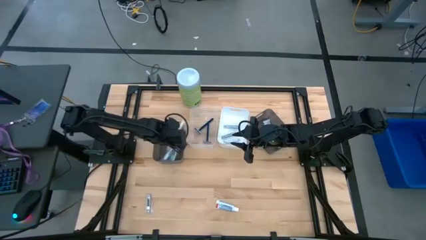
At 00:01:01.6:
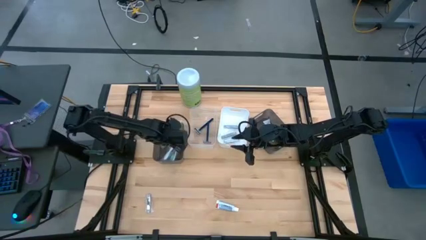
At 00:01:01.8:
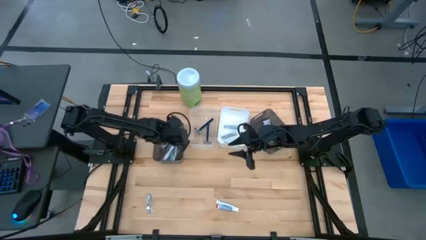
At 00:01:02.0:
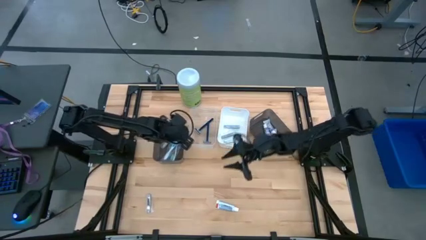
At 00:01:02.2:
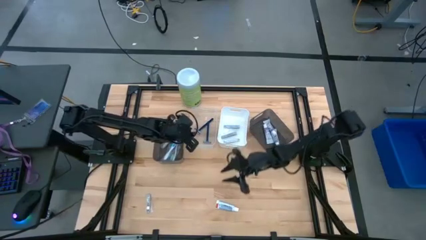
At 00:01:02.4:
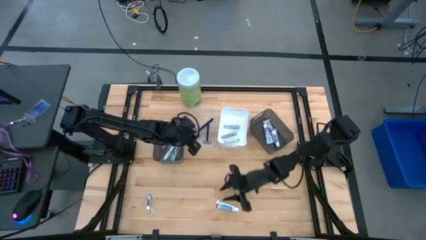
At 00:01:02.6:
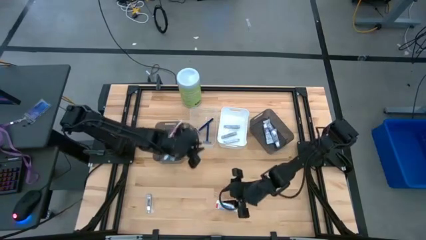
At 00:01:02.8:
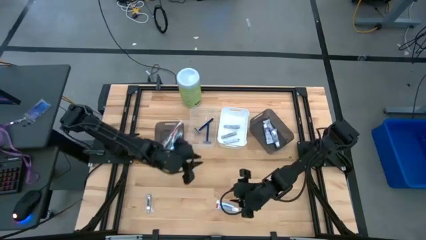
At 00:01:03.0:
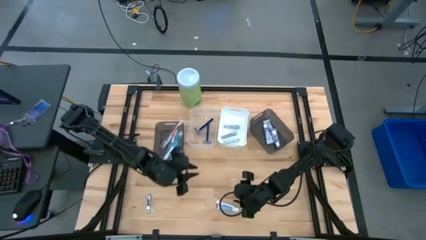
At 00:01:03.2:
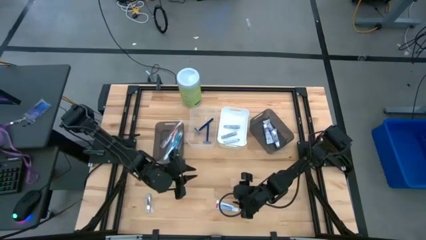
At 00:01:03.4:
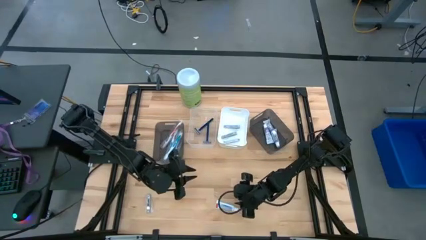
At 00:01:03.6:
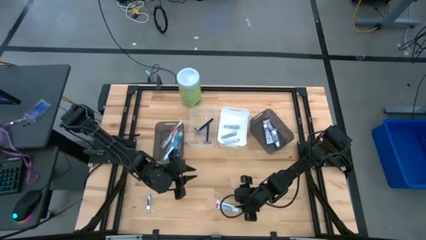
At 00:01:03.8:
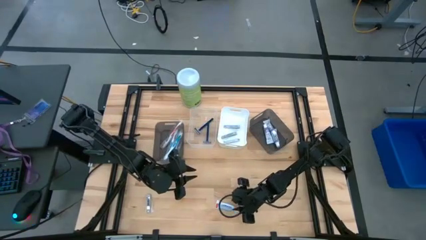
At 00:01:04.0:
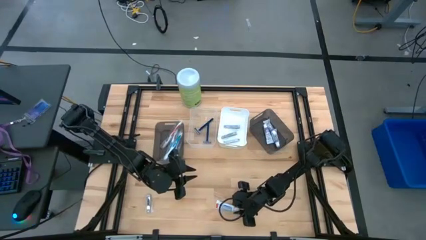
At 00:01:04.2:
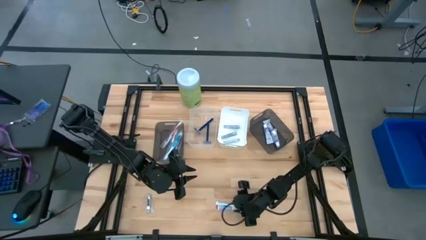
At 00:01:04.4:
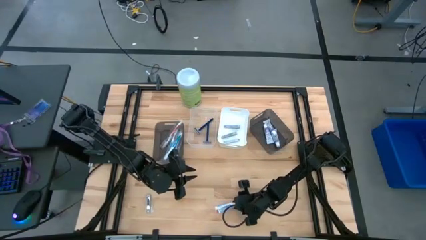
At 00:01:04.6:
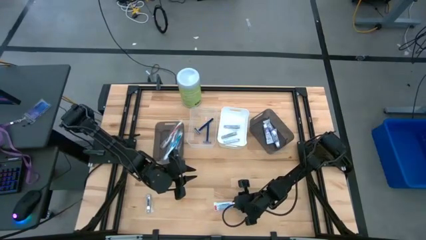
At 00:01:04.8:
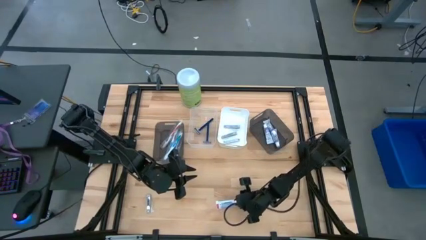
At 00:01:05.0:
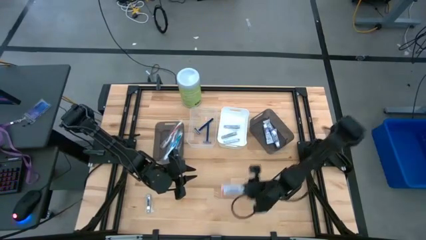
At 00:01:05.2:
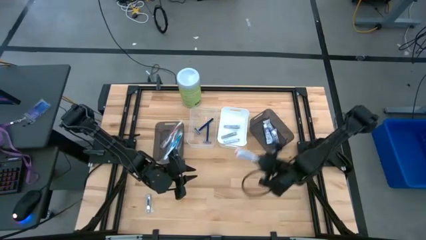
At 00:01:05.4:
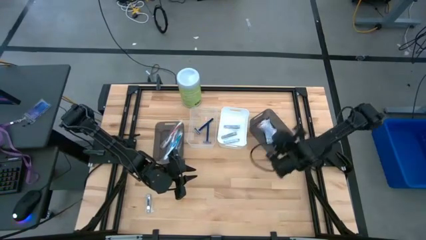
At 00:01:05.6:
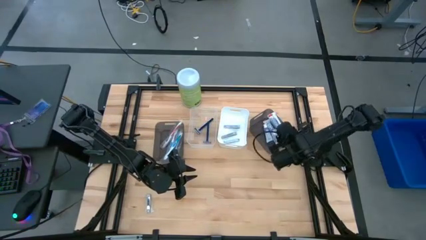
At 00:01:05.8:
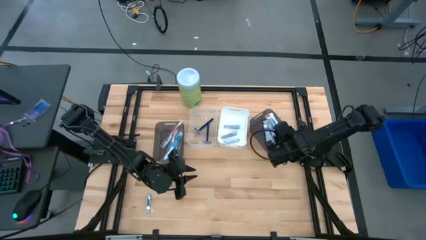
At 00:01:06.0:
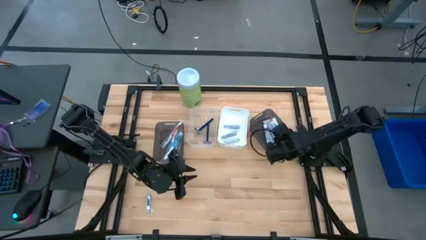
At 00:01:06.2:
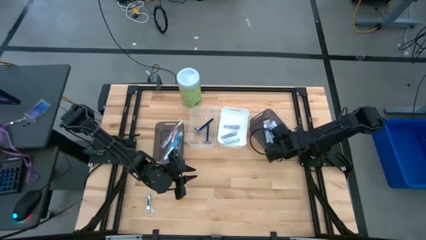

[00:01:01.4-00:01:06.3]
Task: Pick & Place Travel size toiletries
Put the purple toothpaste into the right black bin

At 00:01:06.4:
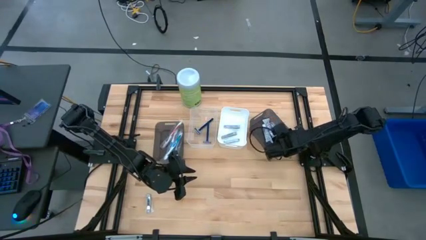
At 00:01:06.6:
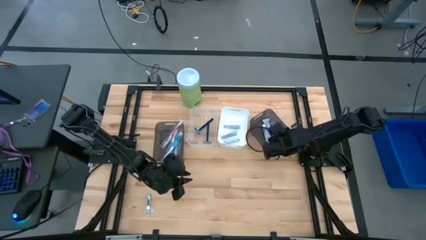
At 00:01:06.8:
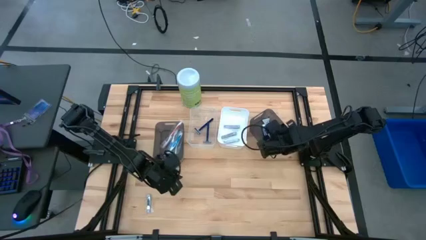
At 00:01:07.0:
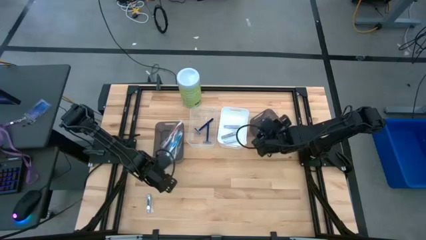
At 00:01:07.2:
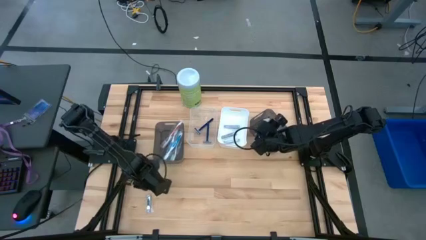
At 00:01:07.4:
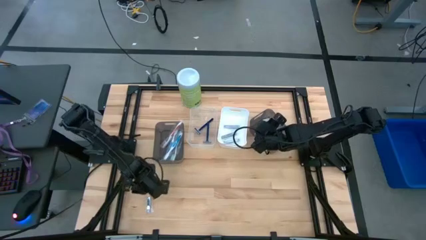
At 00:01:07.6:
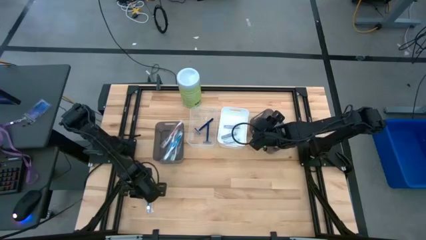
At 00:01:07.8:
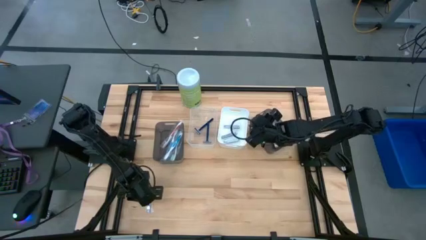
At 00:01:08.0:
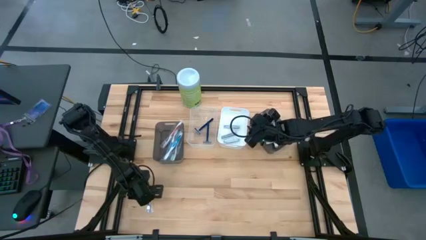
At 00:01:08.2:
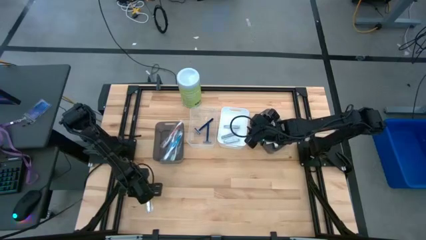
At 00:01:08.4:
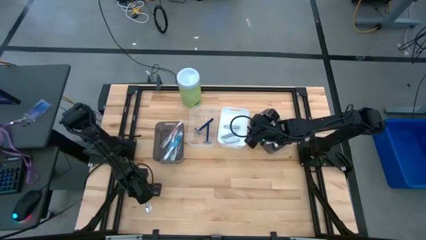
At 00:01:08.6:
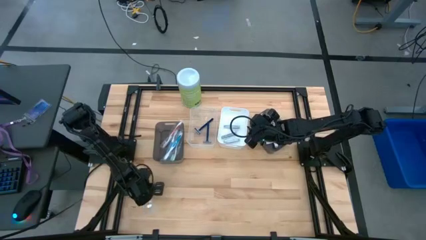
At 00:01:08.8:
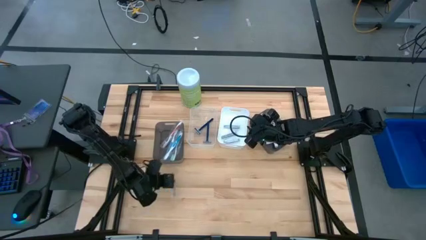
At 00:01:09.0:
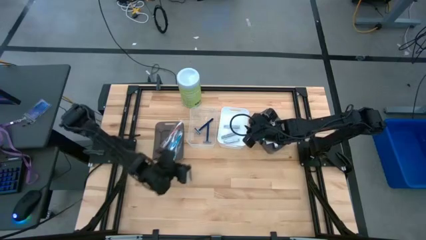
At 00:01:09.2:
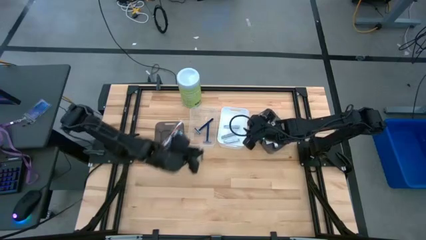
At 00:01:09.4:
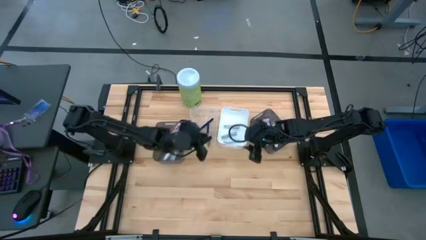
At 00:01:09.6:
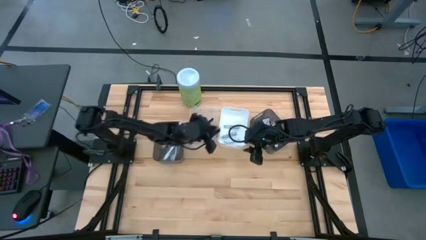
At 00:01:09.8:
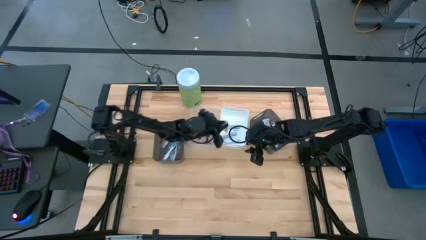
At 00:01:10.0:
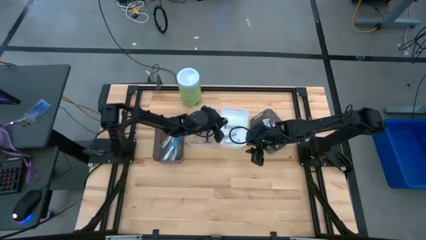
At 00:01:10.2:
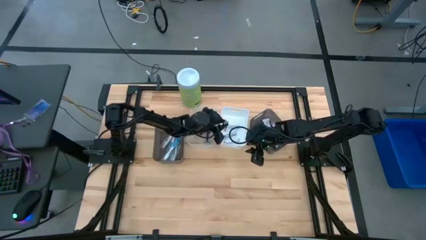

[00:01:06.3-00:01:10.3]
Put the silver nail cutter into the white bin

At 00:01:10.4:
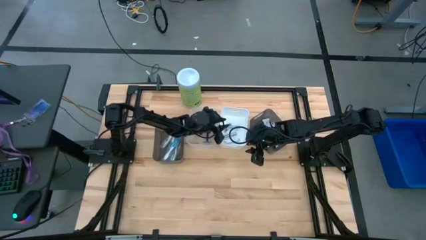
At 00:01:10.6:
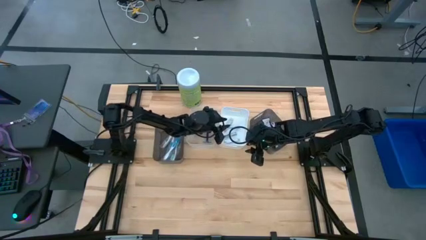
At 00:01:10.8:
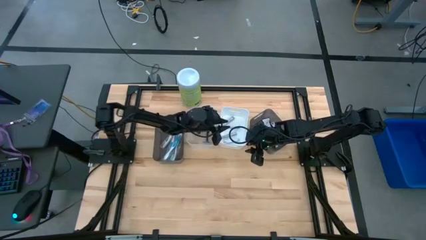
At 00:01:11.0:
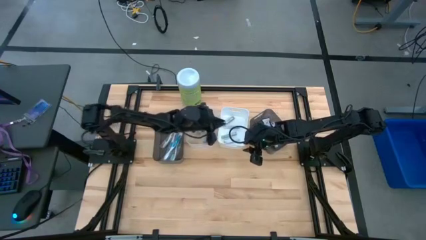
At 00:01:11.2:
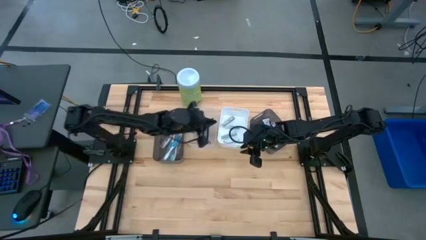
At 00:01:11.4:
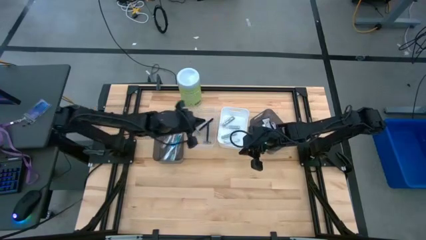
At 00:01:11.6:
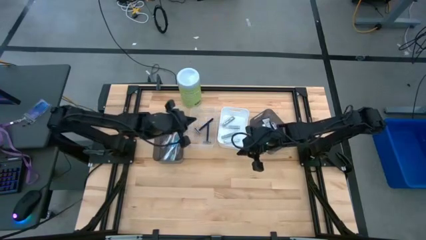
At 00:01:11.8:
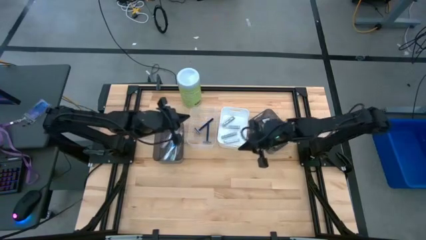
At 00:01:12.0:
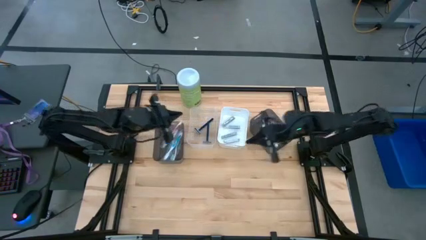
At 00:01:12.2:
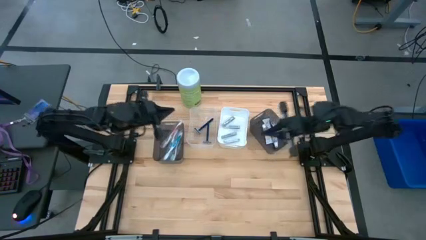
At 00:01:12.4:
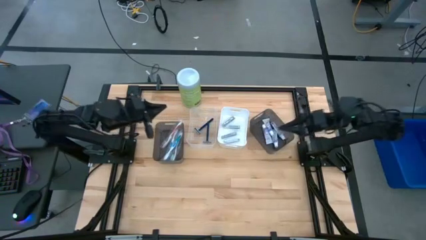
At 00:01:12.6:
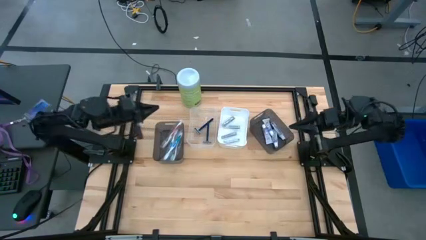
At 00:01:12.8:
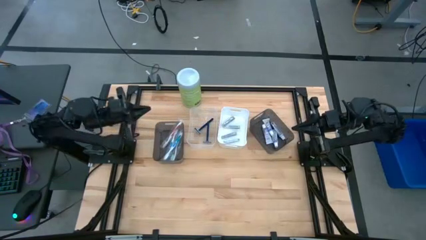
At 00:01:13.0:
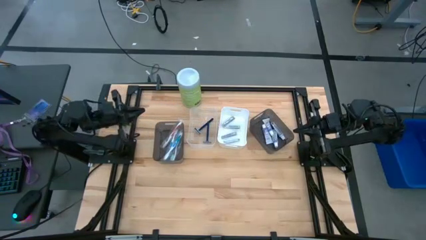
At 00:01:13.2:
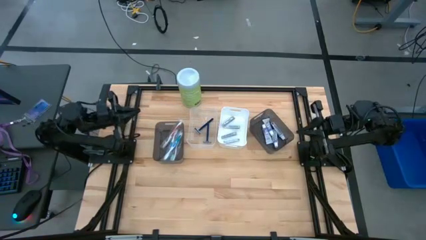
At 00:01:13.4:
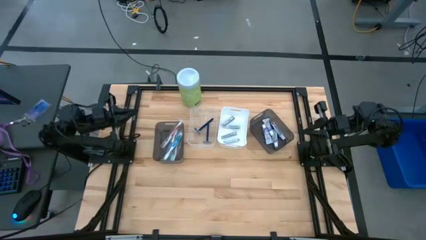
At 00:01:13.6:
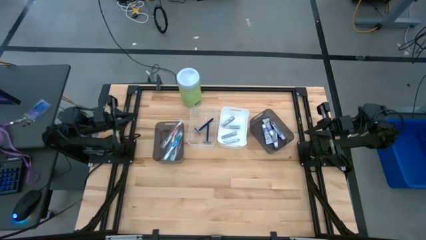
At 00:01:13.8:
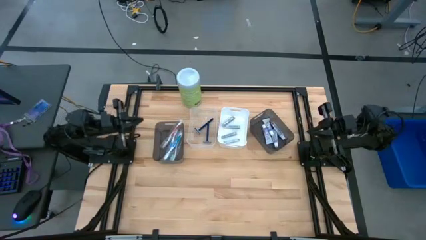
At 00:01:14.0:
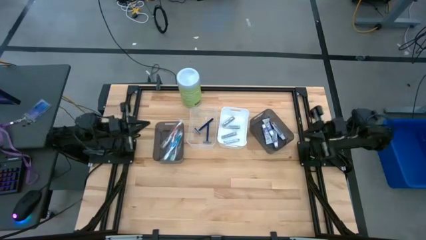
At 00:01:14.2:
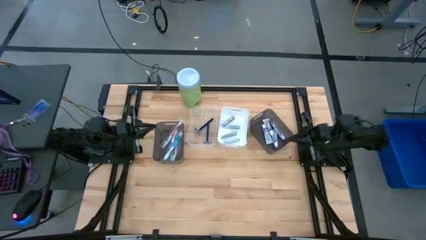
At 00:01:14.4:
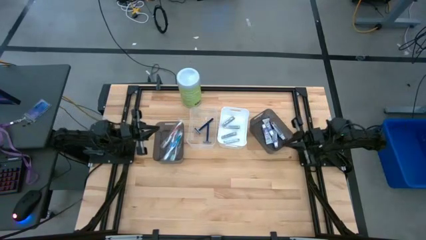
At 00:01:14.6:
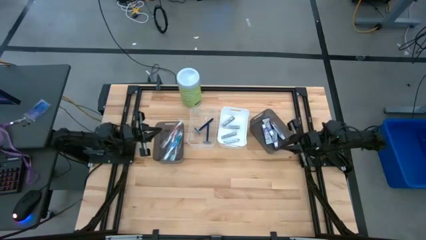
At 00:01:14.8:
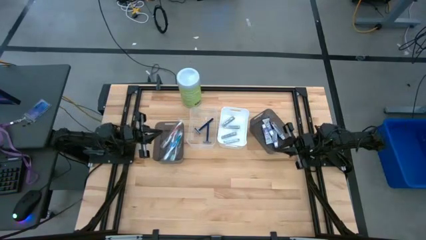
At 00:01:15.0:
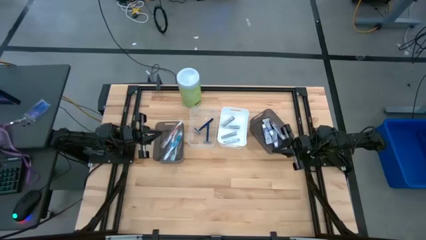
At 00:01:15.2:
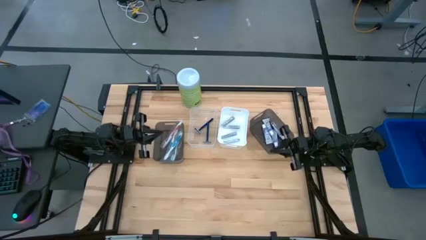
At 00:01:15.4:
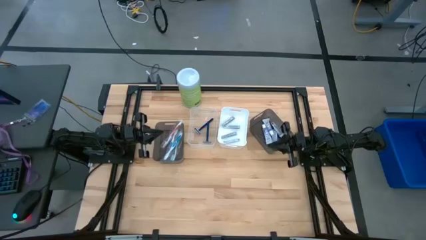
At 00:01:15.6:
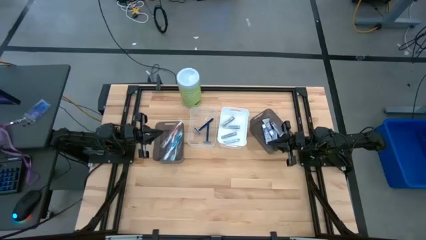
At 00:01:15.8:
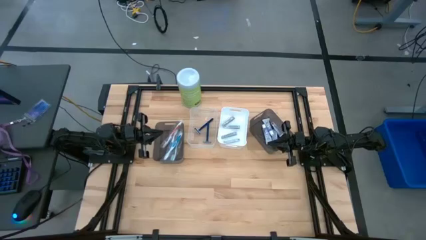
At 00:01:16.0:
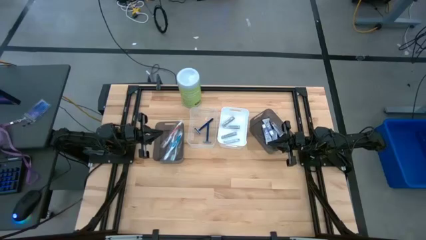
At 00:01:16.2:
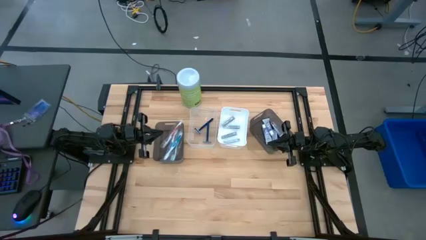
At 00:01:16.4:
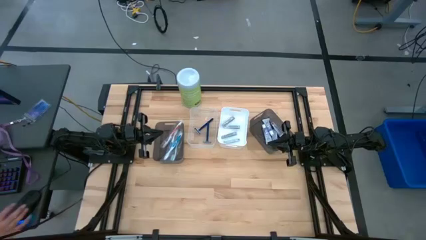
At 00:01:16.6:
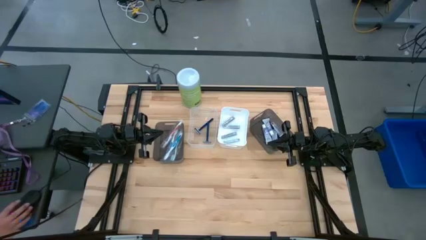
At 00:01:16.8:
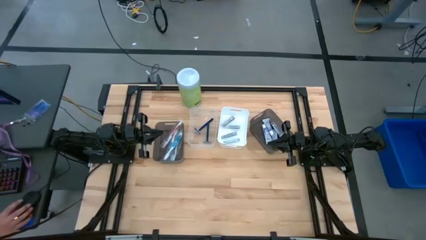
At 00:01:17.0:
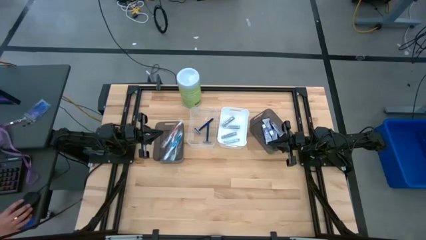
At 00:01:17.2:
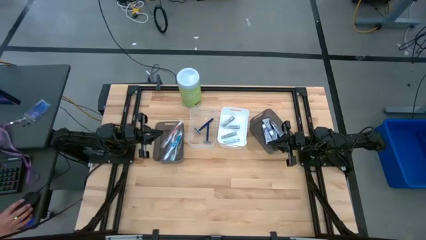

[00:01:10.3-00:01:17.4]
Return to Home Position
